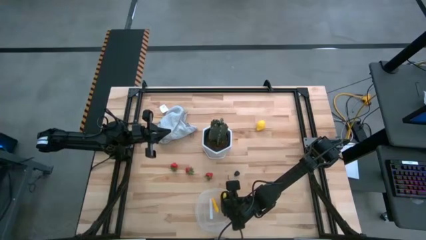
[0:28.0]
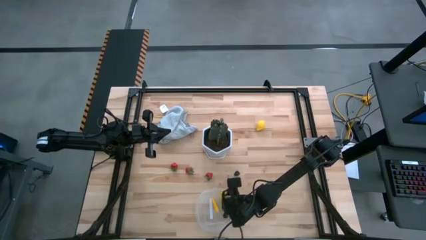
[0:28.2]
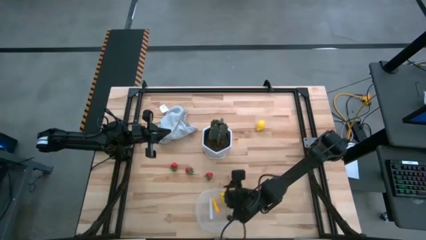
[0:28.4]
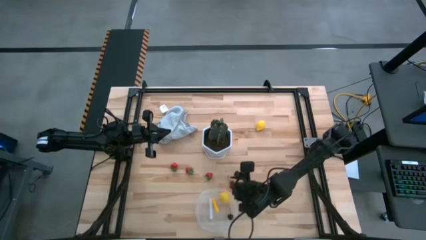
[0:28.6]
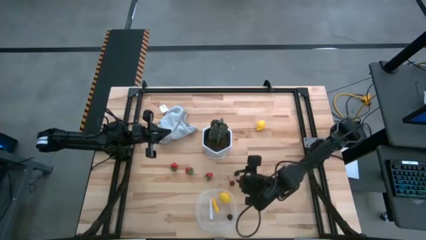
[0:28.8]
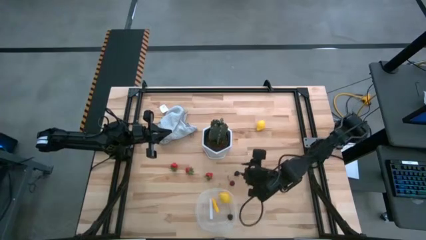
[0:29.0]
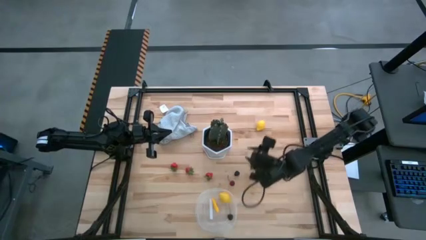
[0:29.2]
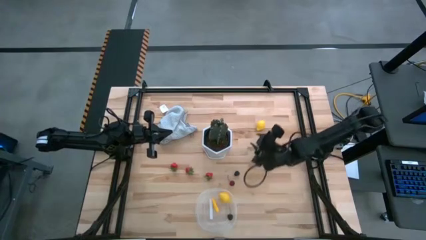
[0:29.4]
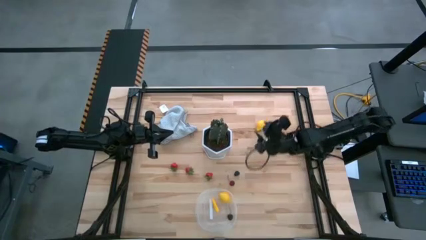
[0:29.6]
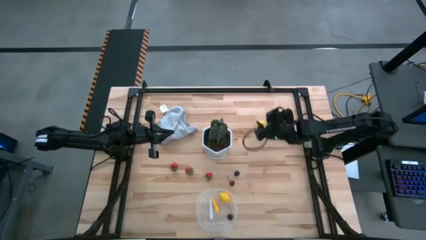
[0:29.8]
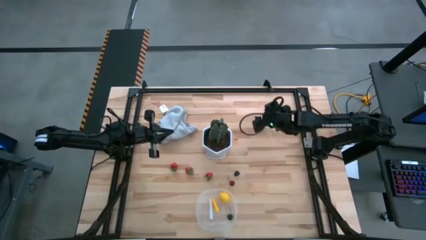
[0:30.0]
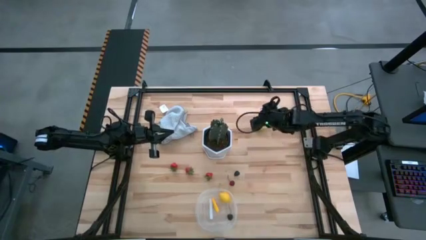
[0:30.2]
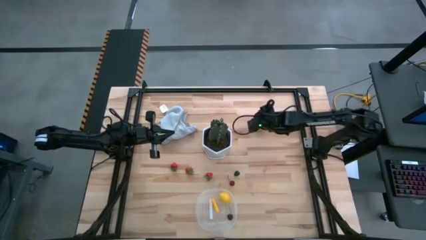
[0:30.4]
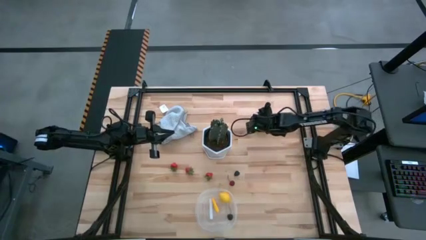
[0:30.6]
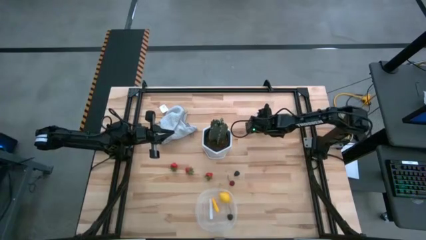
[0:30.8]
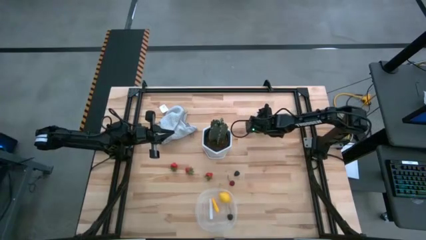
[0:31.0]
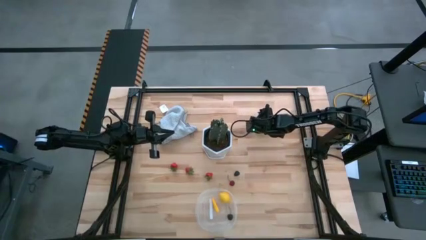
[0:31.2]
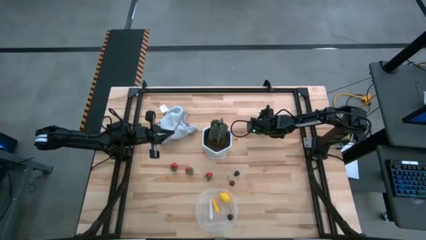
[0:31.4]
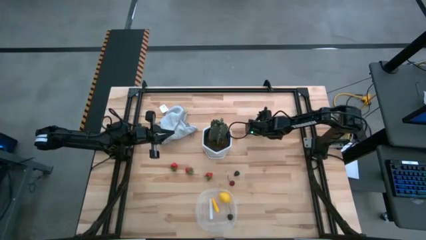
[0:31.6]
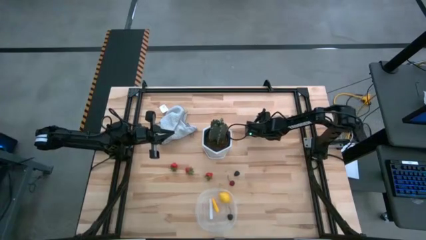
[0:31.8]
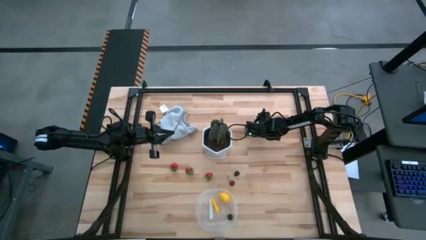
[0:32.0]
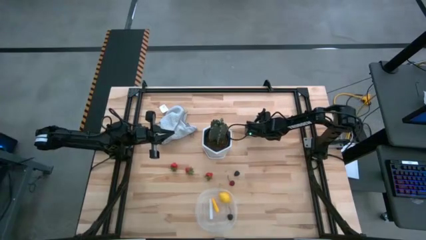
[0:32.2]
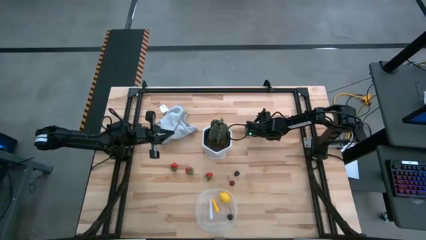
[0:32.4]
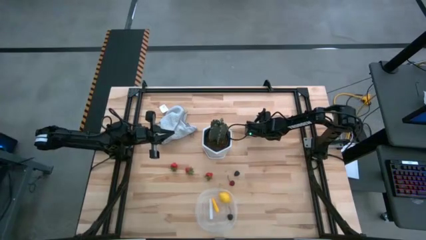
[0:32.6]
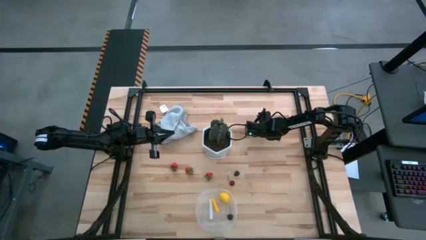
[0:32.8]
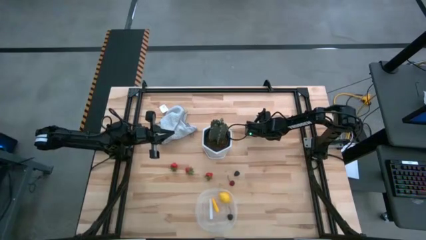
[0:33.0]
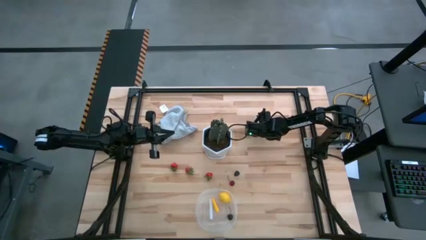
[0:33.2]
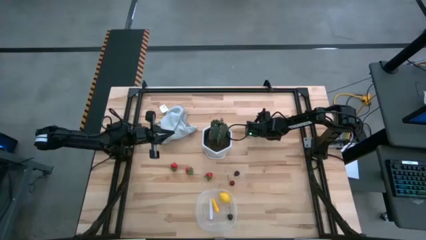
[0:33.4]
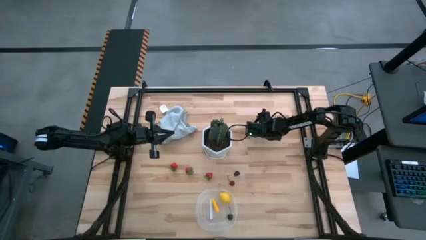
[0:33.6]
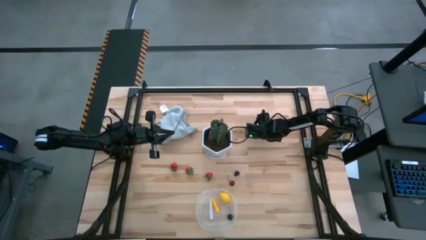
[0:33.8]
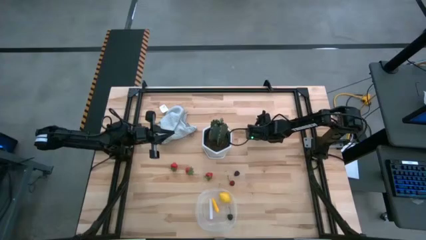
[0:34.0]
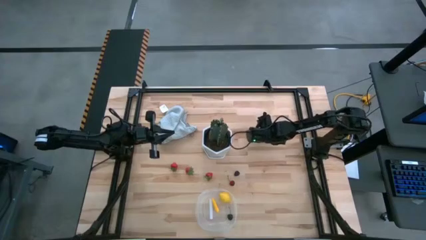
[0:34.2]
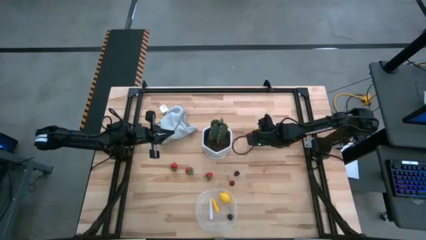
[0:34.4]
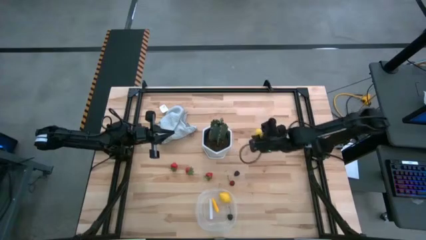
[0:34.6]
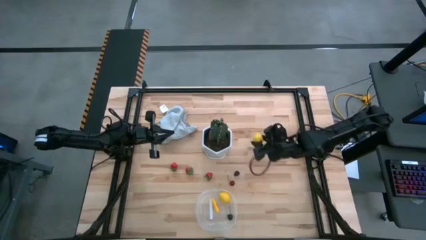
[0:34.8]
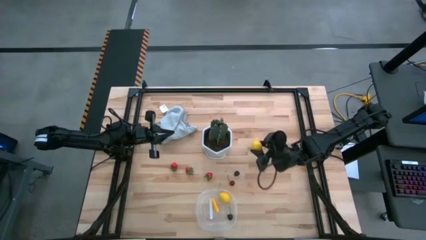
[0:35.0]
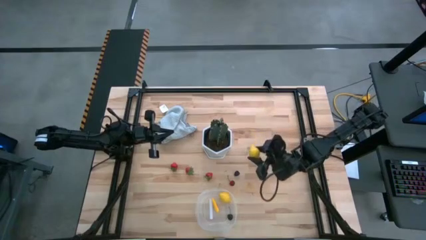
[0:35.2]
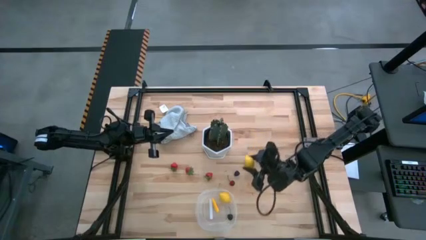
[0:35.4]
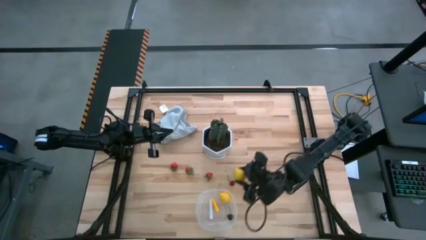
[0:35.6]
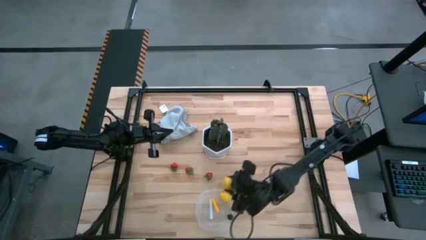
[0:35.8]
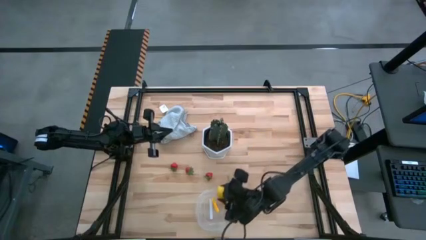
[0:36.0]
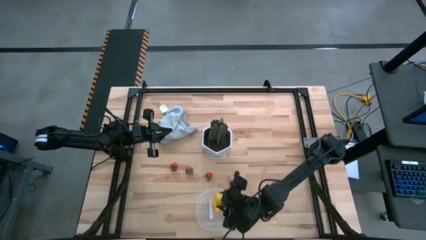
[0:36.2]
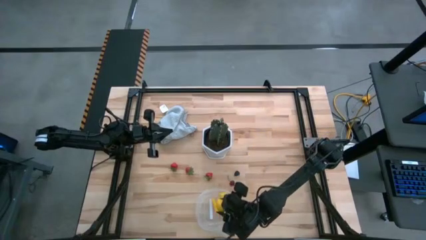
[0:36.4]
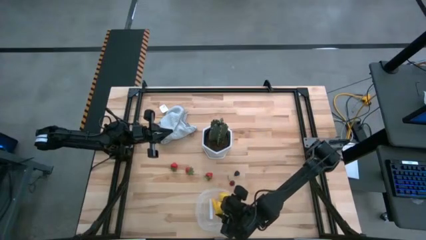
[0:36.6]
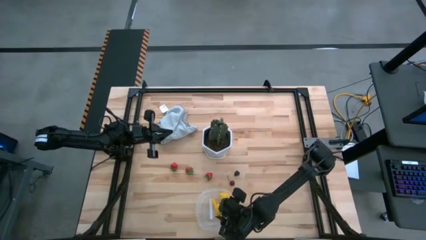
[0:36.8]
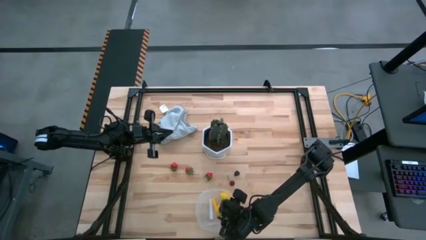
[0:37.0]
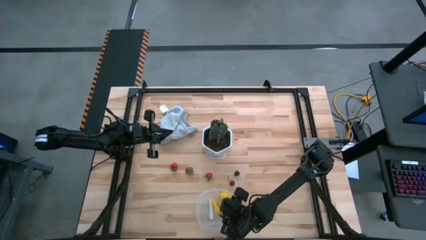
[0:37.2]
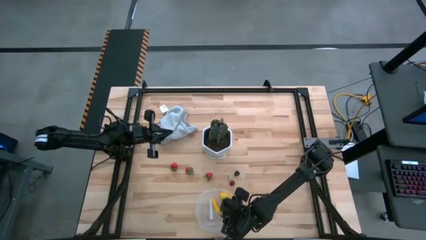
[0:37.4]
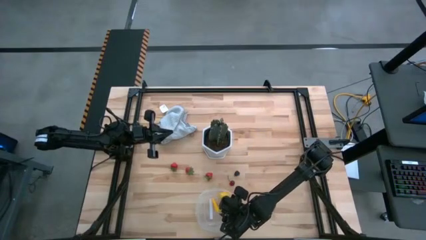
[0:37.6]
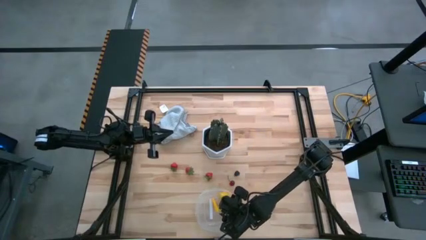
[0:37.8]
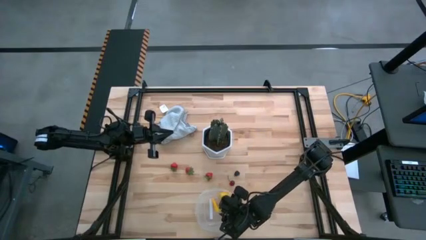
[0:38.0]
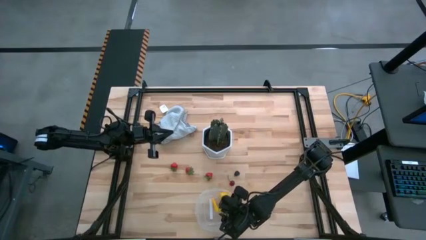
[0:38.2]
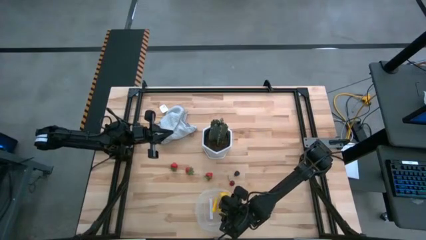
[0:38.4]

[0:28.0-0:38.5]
Task: Pick and placing Produce into tupperware
Put the yellow lemon into the transparent bin

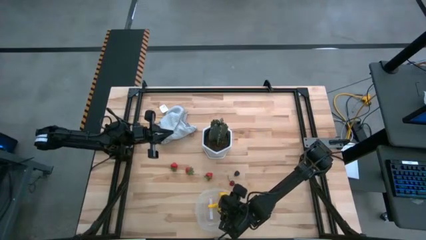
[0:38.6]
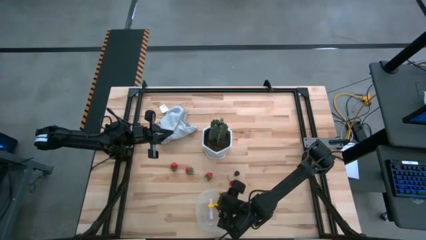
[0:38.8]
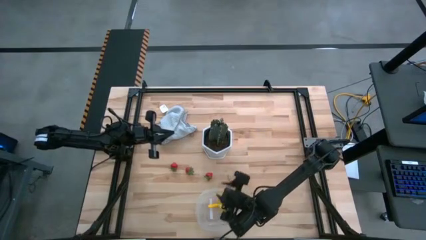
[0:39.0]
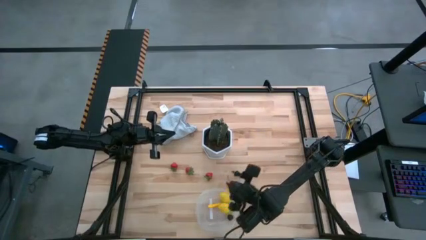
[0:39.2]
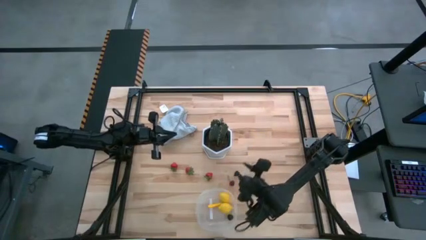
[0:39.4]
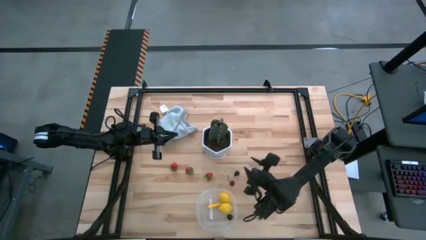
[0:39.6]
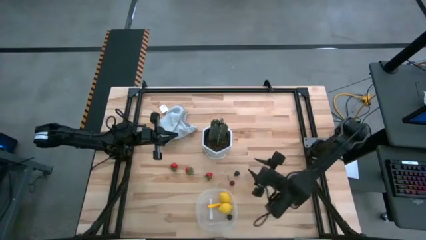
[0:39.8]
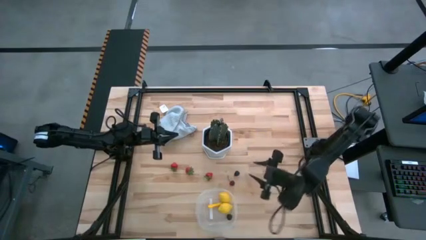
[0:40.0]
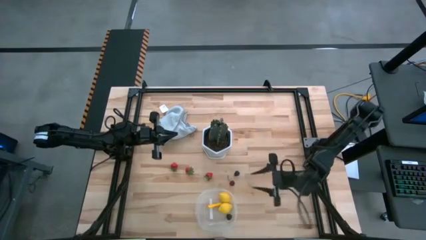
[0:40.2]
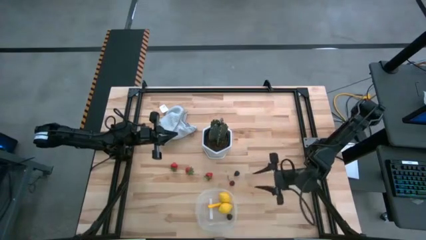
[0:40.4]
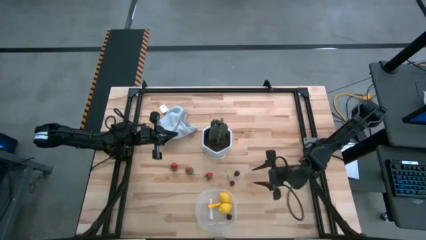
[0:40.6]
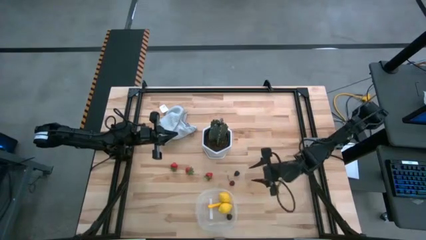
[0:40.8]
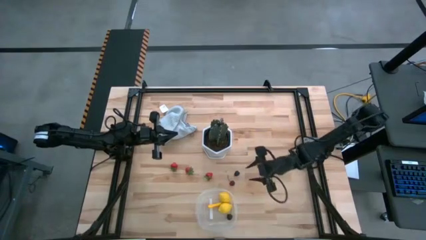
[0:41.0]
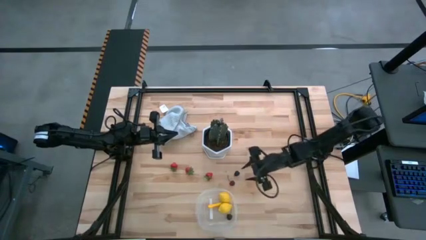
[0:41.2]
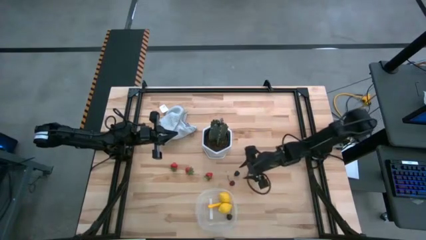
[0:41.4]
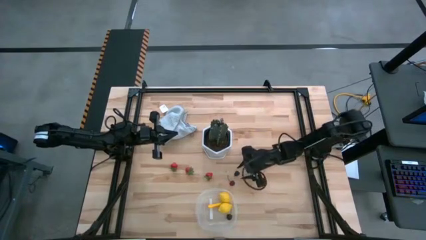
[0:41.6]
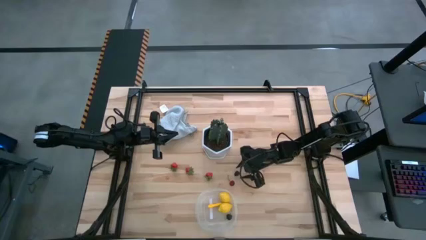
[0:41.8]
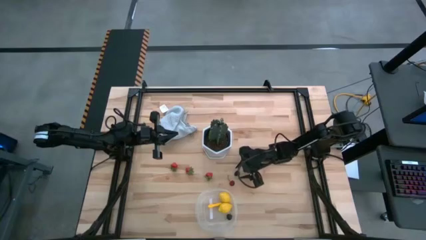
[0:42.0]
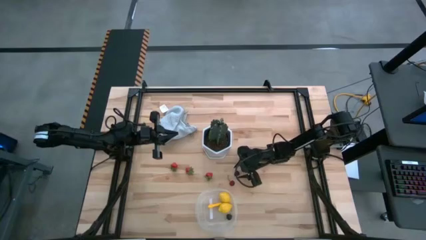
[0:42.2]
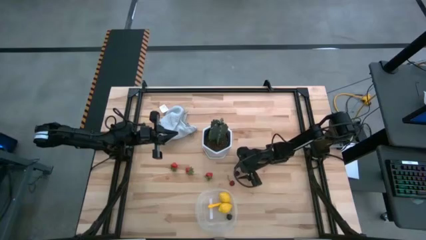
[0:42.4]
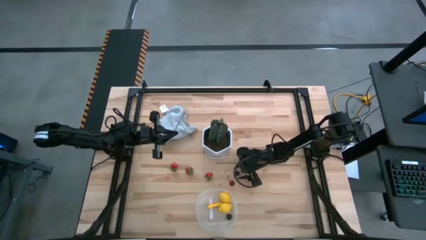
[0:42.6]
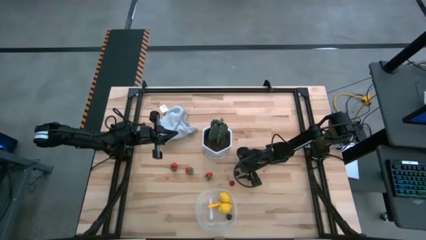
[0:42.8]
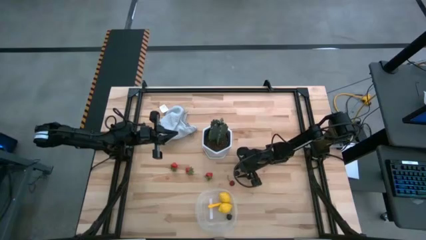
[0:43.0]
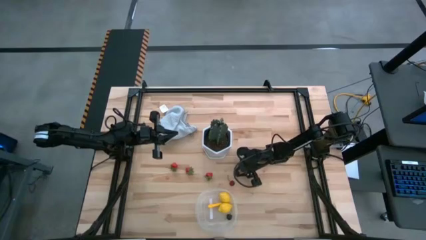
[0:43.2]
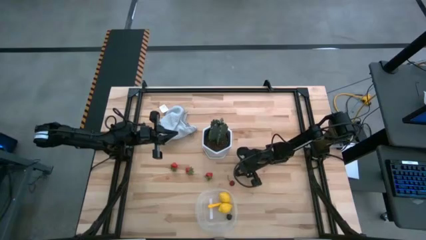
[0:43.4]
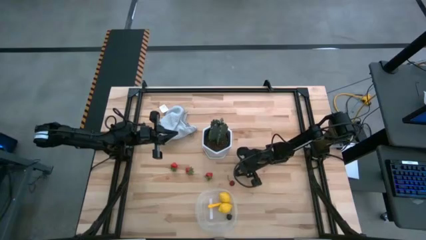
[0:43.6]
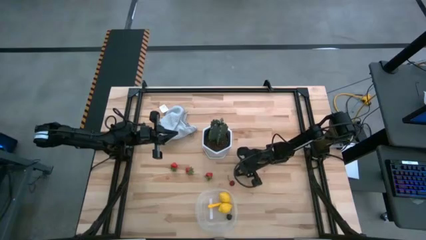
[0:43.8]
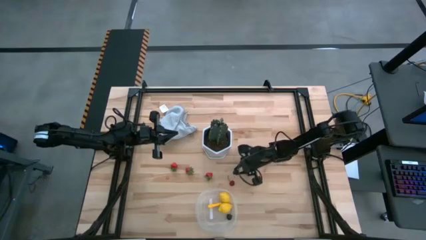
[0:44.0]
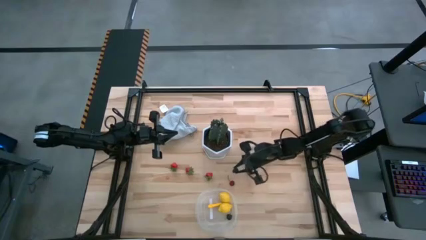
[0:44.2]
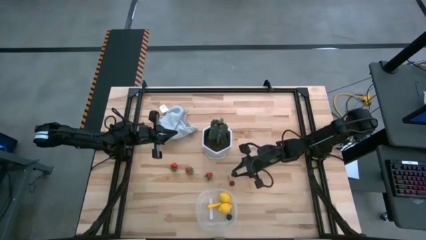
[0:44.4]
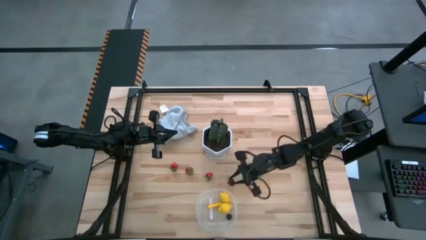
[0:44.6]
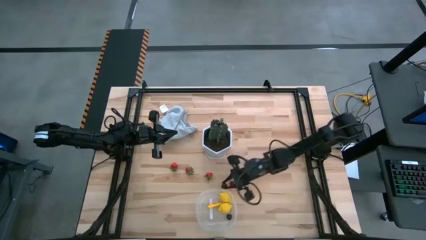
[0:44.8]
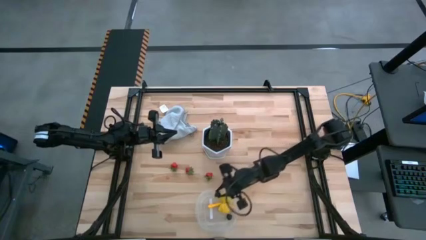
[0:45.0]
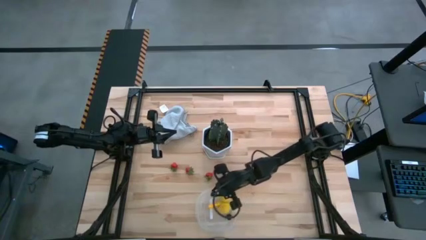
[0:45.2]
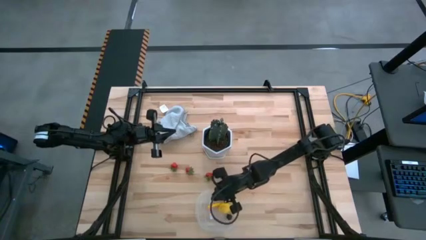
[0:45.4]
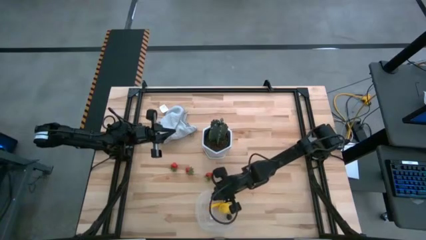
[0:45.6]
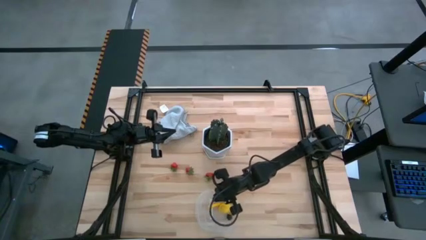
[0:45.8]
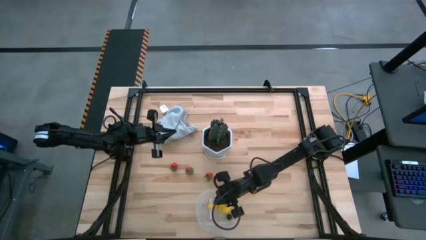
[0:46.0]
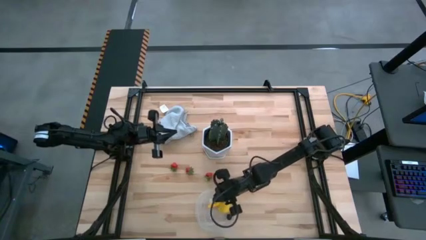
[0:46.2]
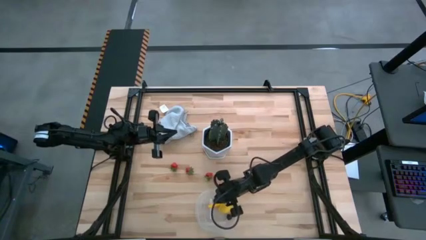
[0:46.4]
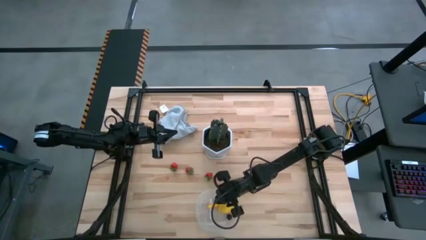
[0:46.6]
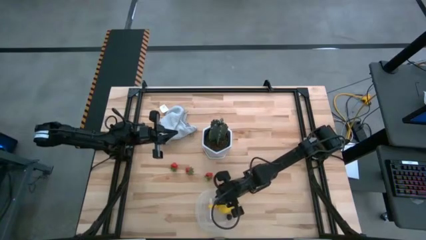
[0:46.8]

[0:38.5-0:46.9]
Put the blackberry into the transparent bin
